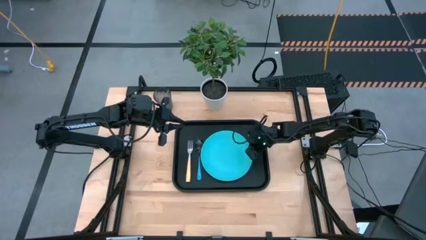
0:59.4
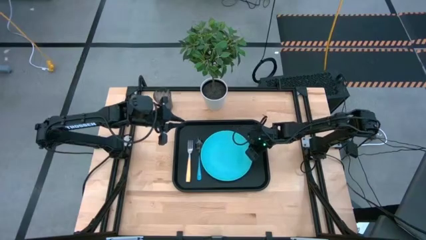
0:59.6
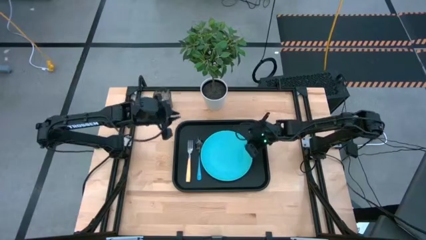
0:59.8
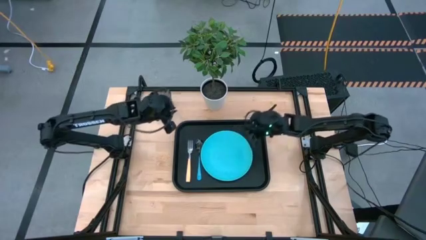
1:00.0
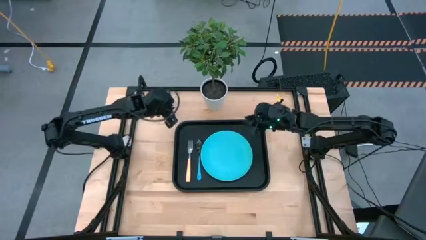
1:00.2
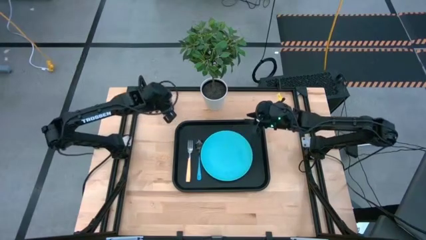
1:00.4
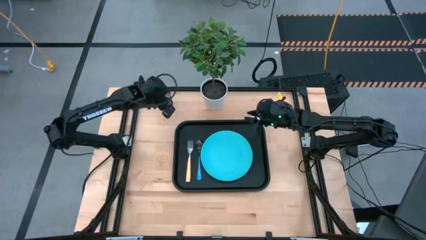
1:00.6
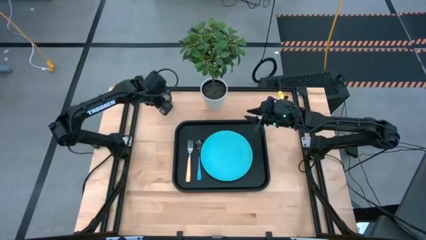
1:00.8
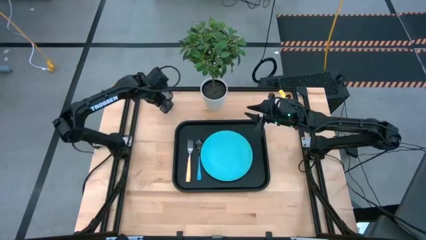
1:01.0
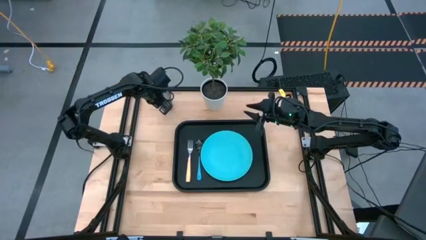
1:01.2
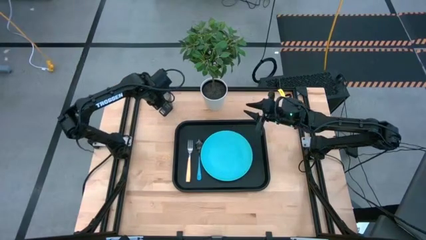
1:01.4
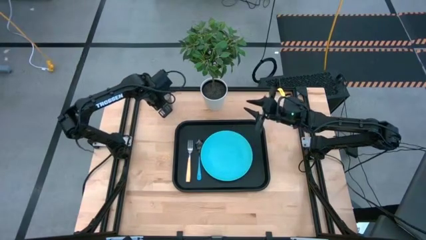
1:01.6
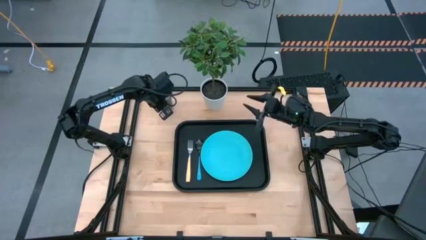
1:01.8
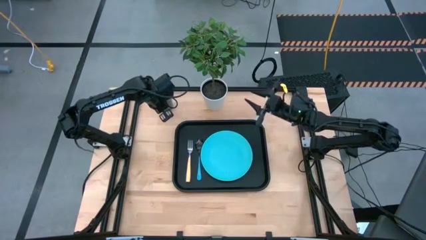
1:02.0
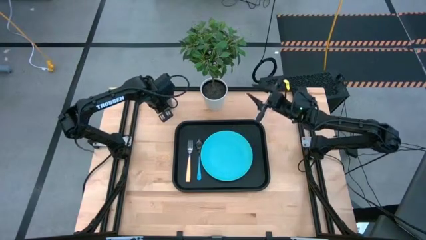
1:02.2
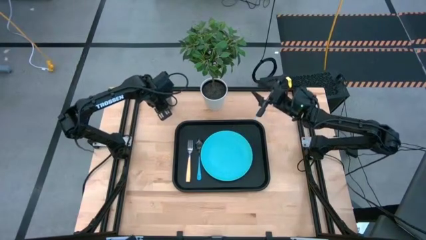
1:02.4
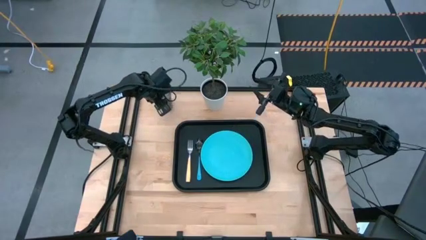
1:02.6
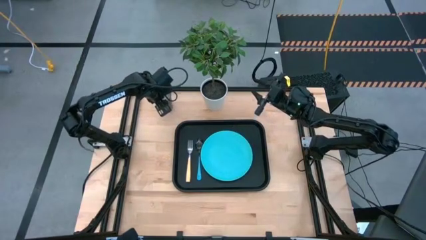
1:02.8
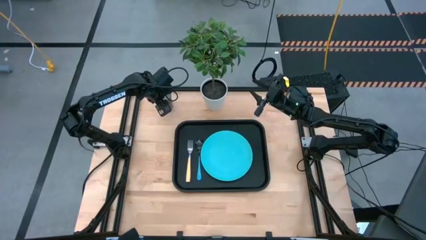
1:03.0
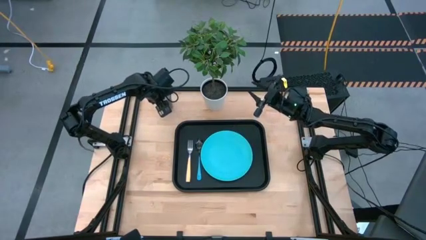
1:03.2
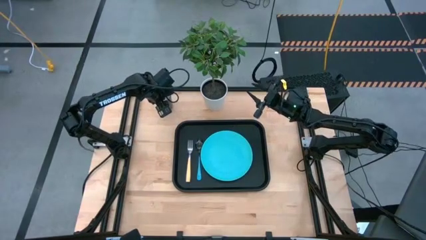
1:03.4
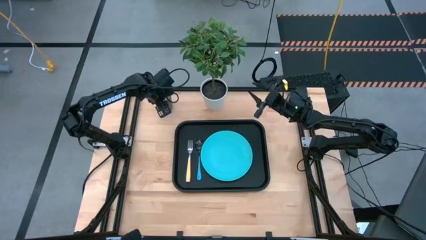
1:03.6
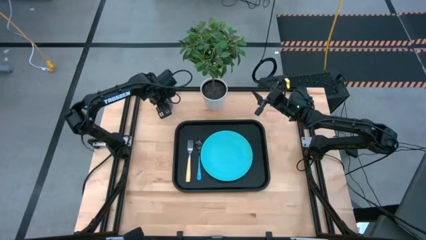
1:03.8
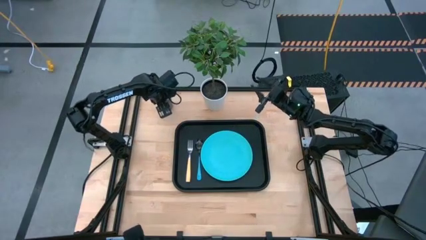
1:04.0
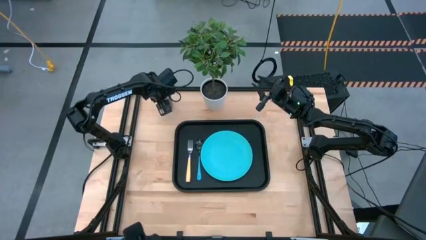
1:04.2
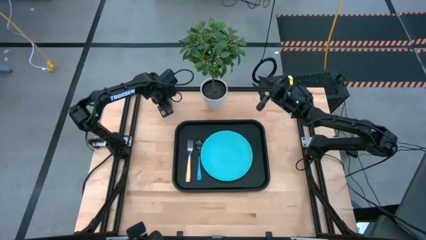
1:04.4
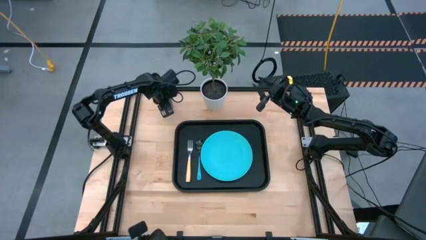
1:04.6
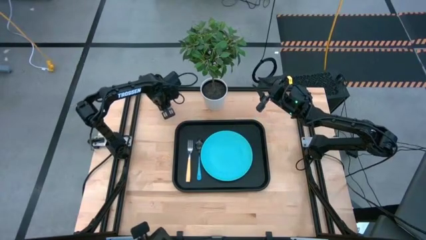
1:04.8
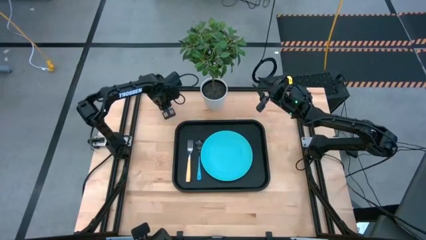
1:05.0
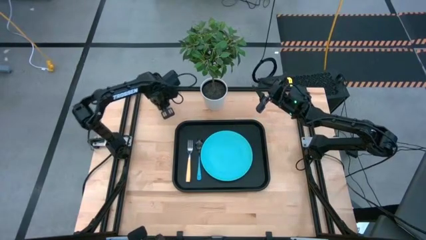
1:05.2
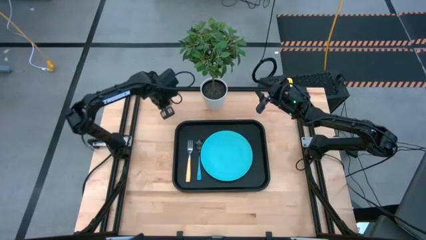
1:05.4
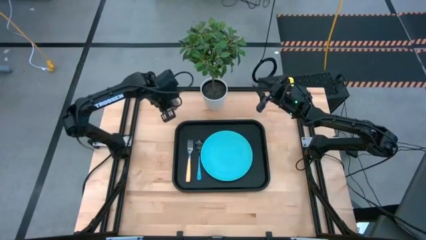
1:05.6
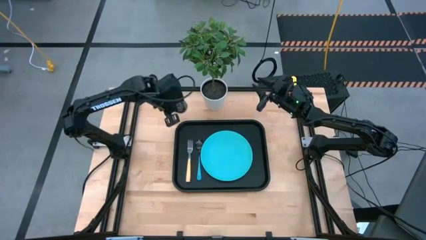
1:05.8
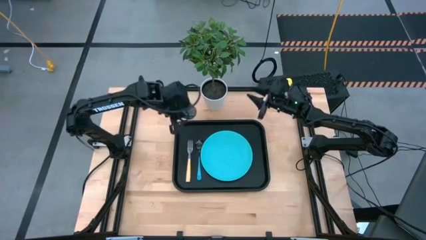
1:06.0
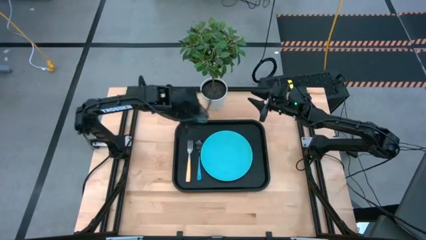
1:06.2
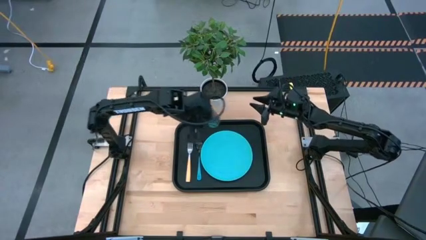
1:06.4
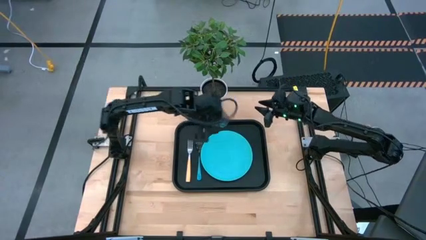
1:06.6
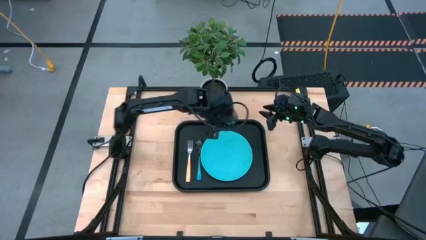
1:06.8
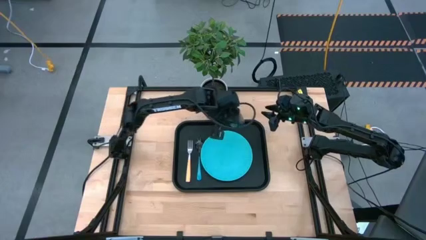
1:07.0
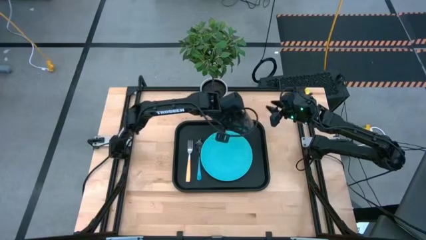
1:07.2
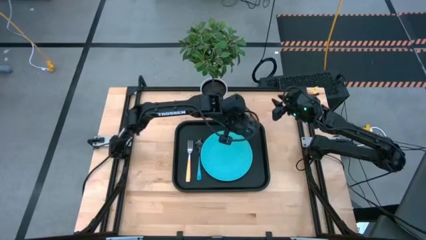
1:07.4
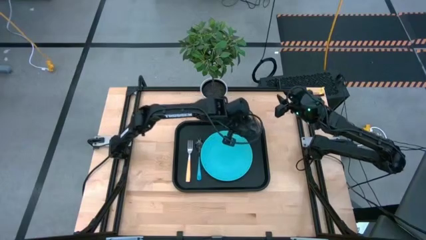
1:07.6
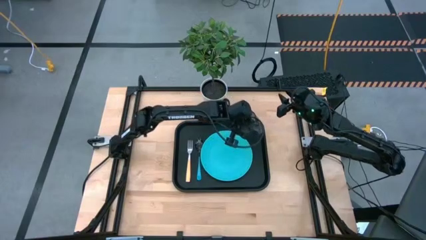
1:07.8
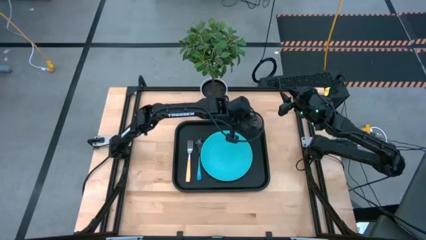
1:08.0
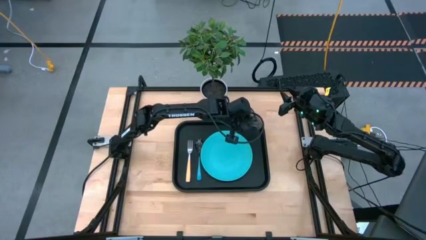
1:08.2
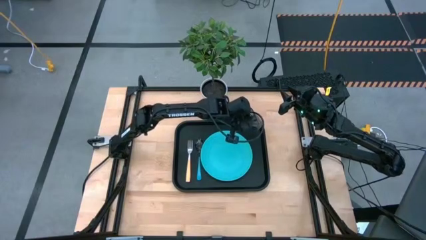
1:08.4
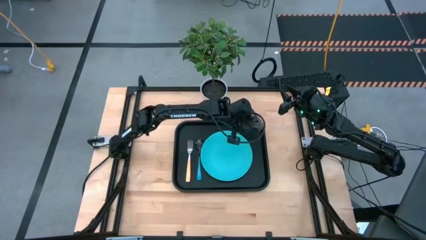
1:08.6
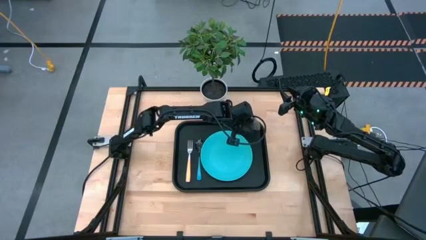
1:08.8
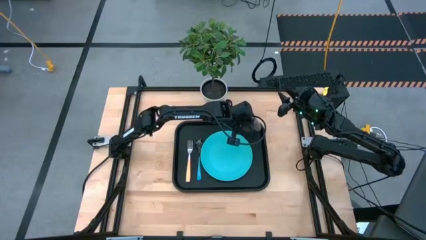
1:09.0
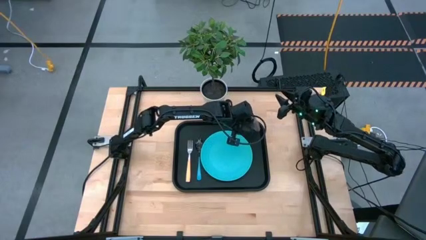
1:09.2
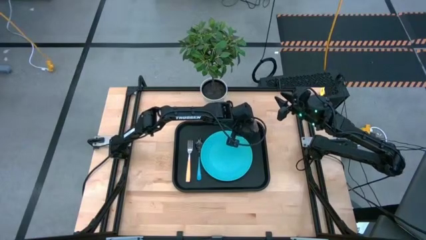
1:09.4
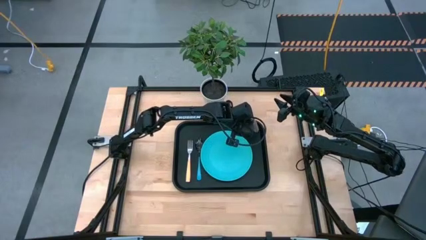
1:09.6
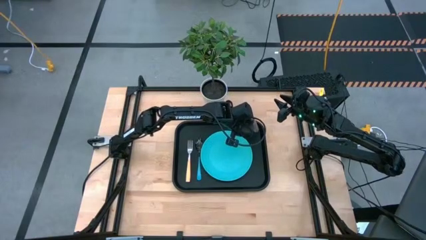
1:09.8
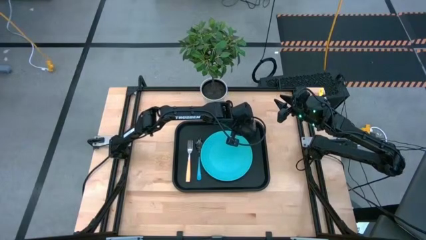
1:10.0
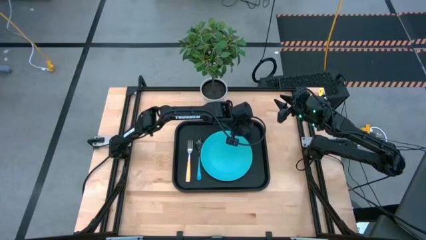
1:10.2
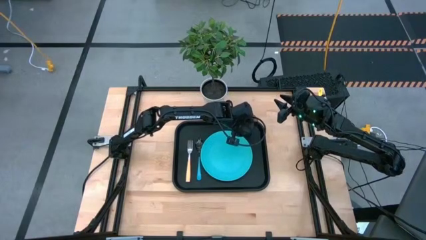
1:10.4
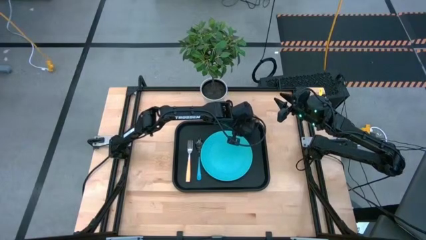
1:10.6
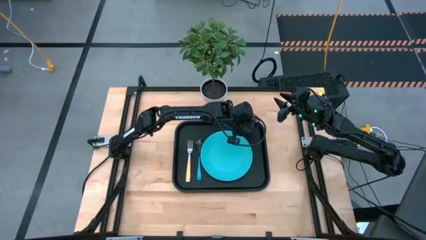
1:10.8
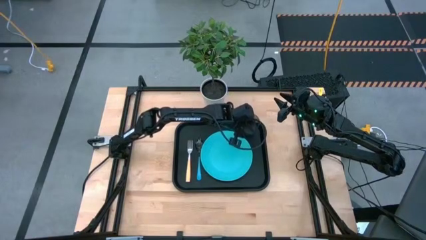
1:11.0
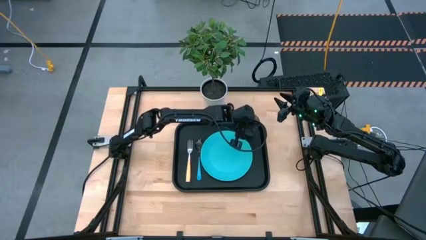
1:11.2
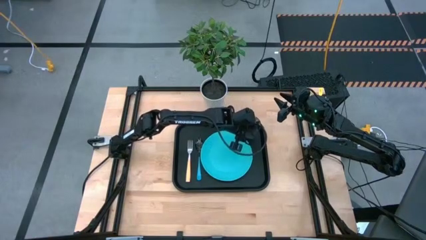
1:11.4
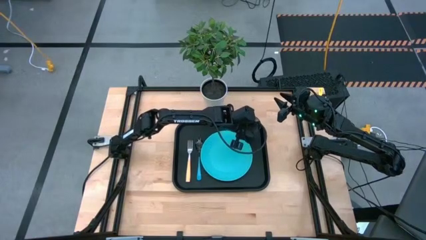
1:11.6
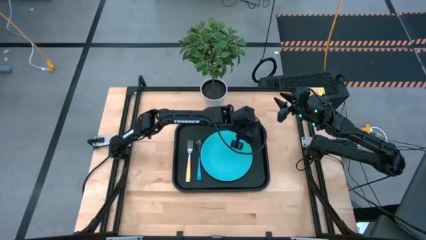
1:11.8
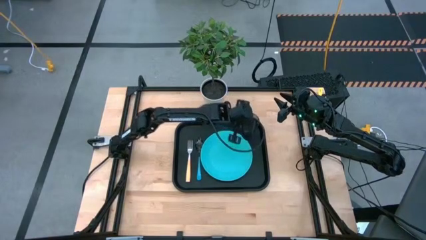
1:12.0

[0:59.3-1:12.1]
Task: Pick and place plate/cup/fork/spoon on tray
Put the blue cup on the black tray

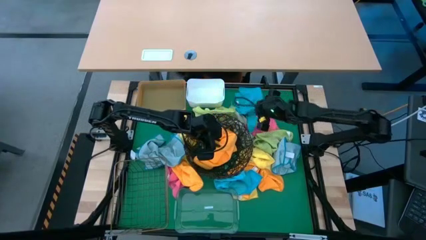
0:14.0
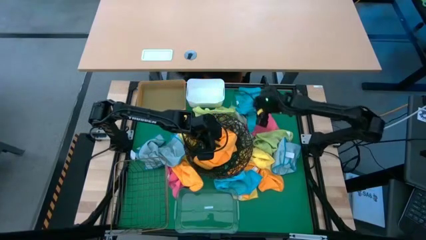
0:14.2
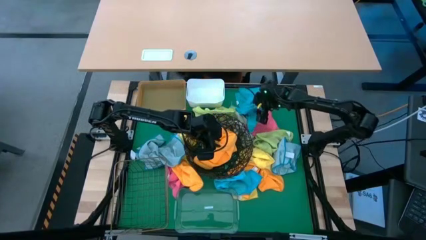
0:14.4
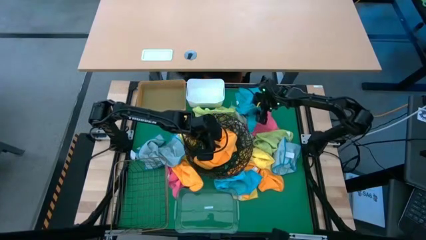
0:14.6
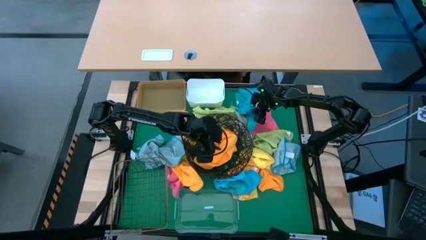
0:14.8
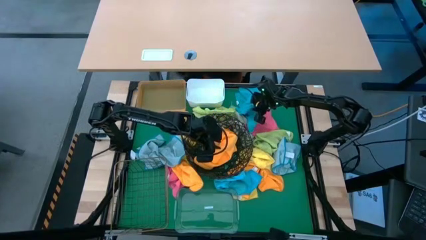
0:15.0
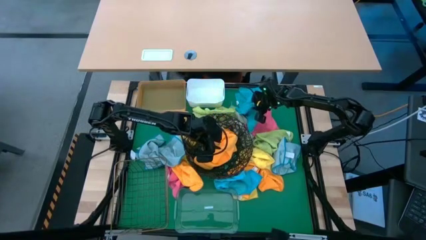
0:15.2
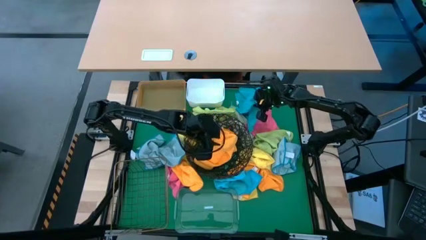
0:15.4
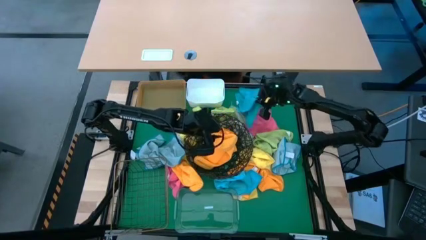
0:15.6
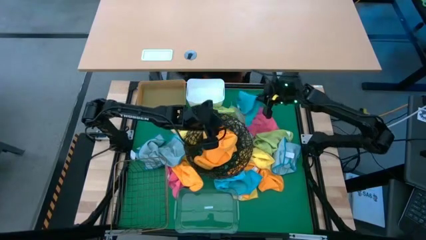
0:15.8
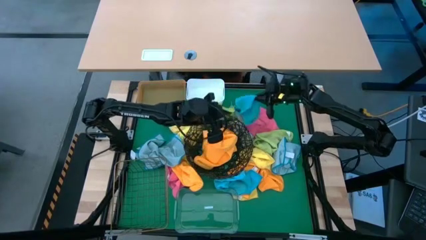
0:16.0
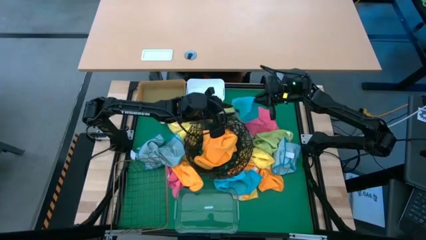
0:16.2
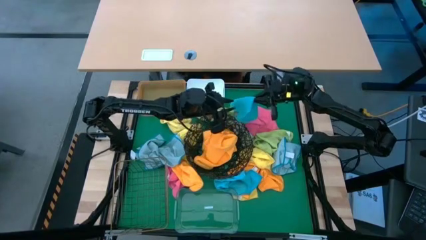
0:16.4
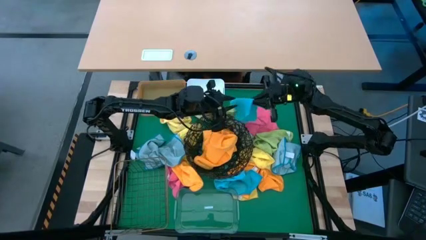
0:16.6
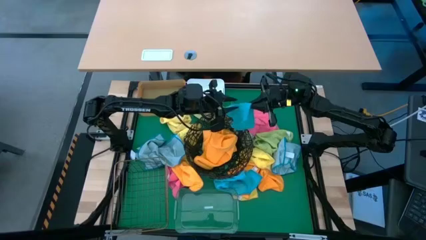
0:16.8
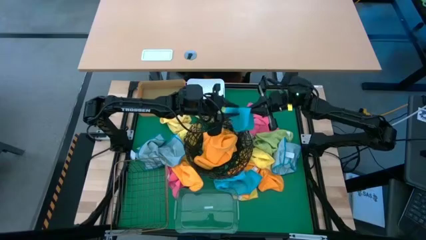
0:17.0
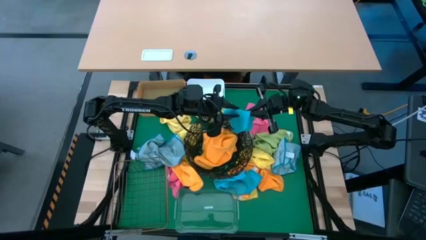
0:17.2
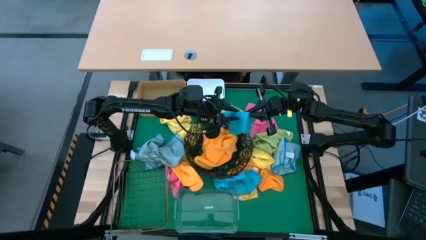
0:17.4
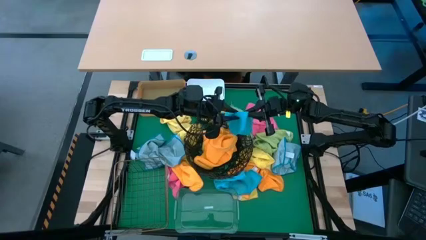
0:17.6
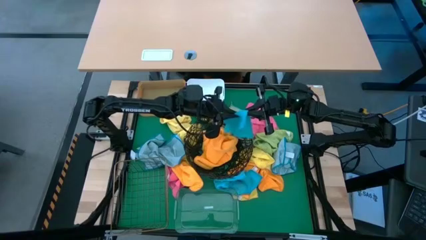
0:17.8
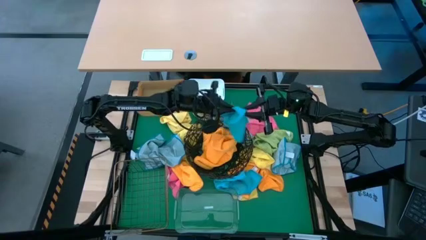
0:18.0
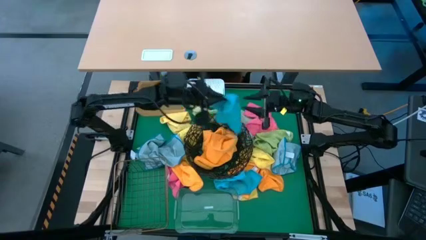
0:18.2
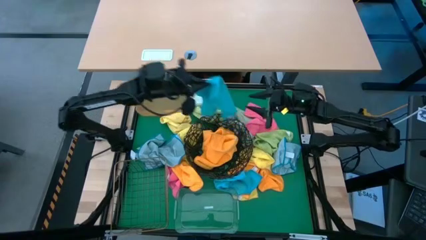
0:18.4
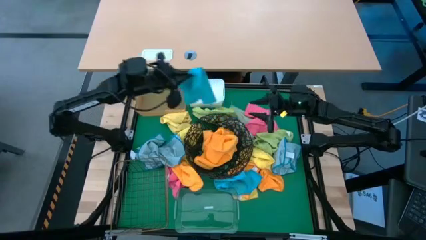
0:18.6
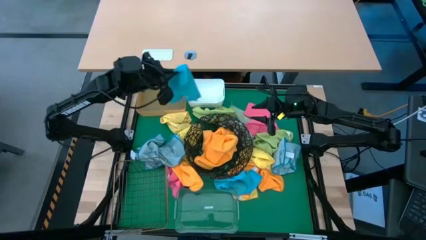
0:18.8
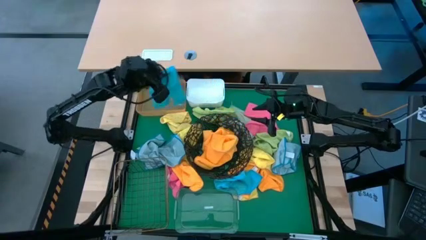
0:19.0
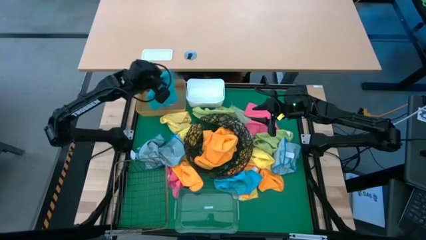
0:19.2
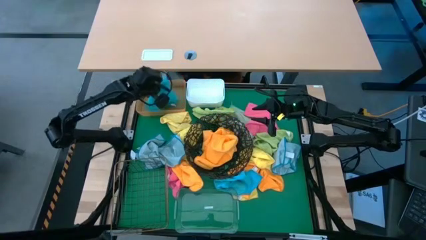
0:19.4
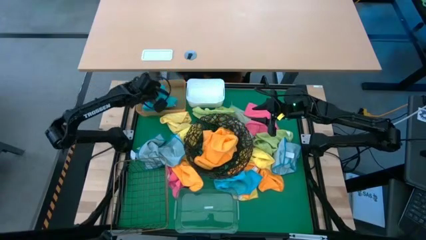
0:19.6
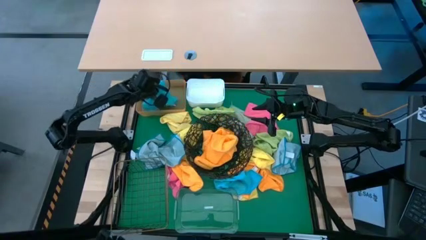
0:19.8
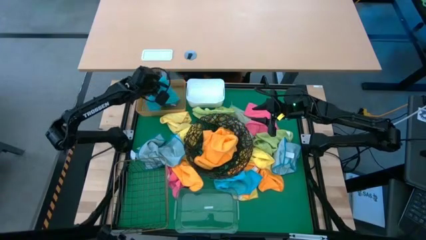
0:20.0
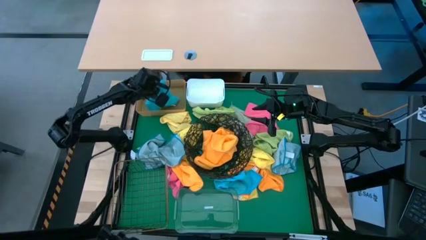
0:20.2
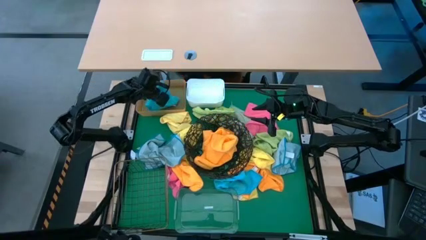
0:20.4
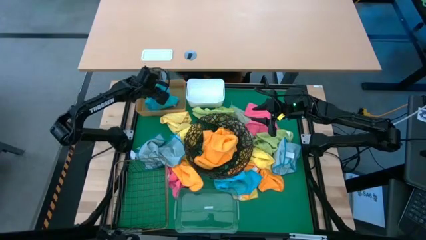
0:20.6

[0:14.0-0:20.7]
Task: Sort microfiber towel by color & place in baskets
Put the blue towel into the orange bin
